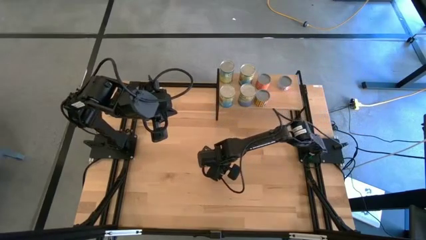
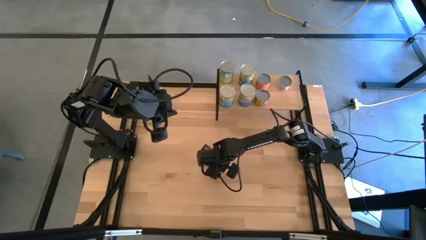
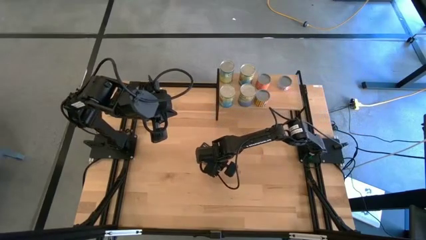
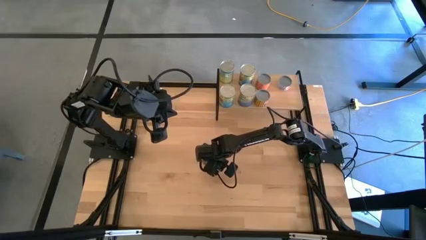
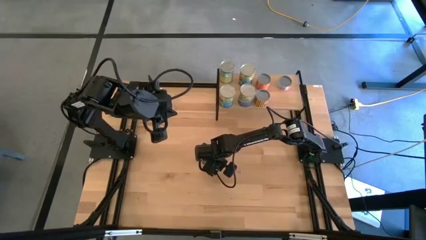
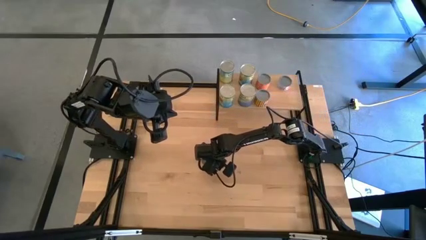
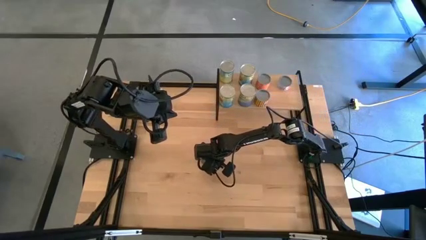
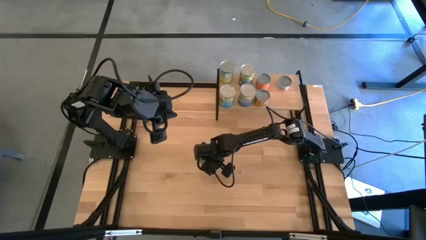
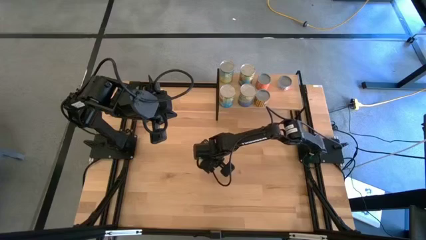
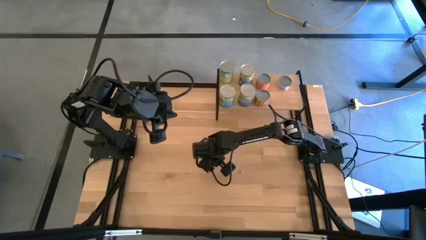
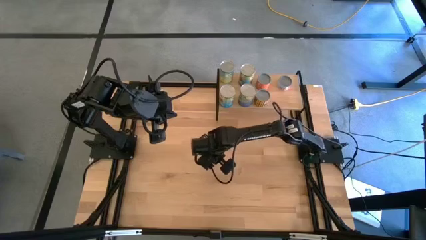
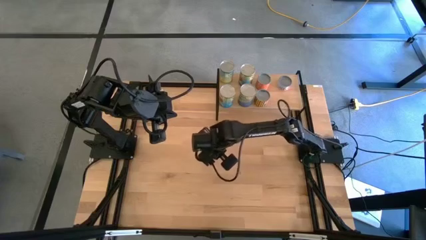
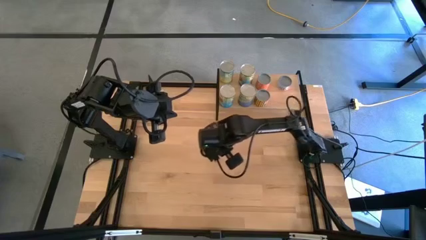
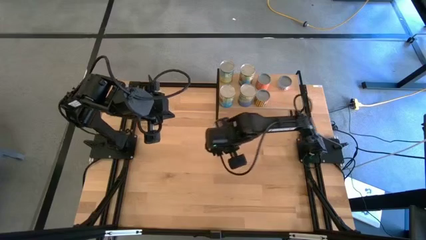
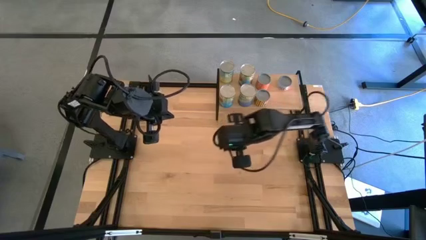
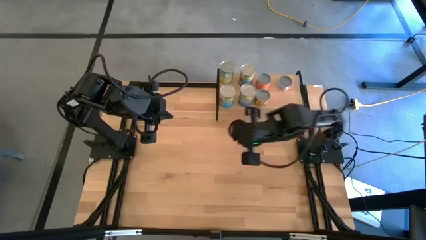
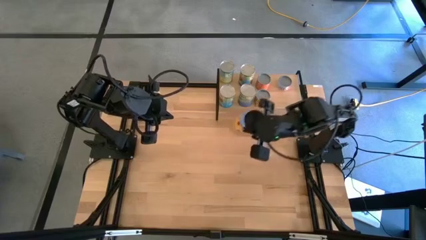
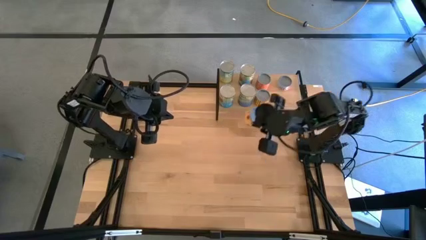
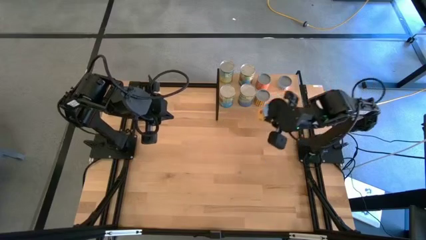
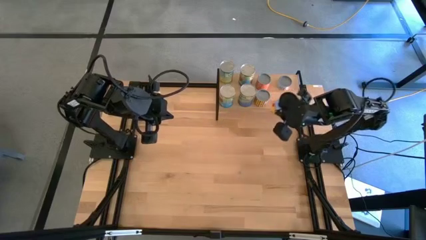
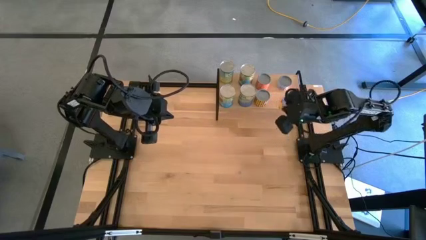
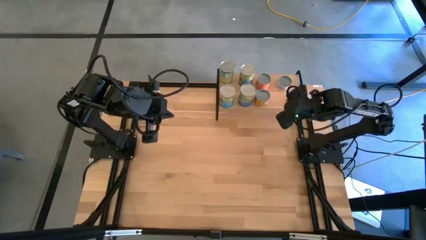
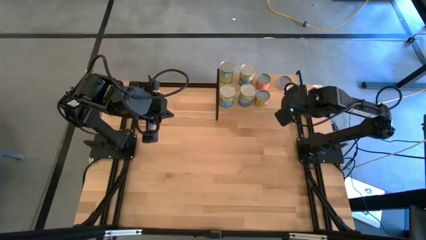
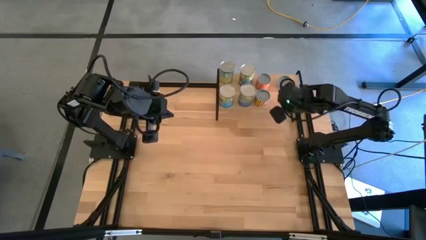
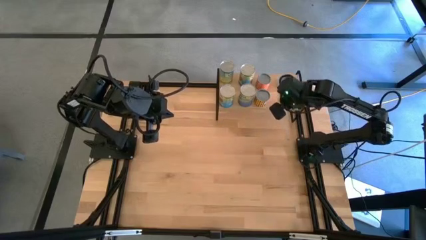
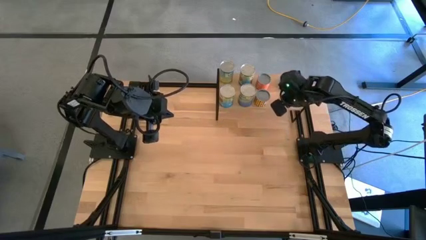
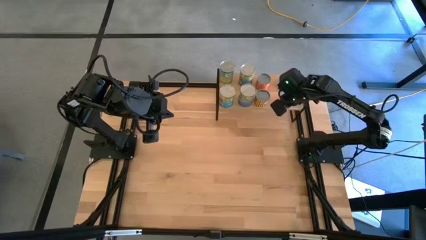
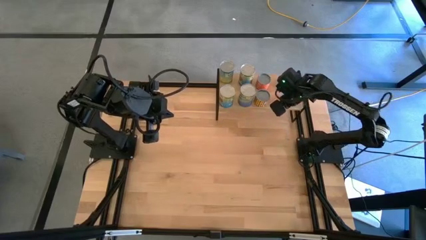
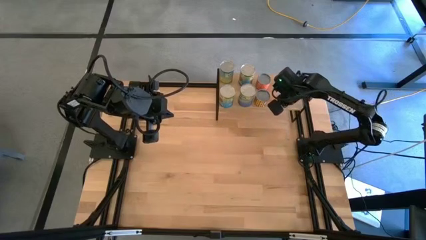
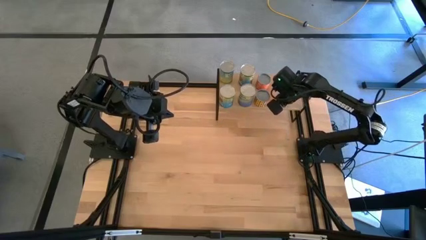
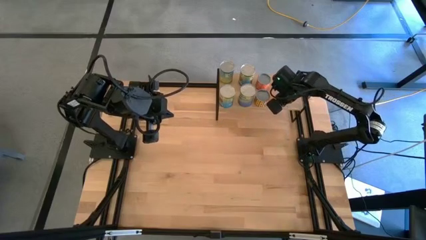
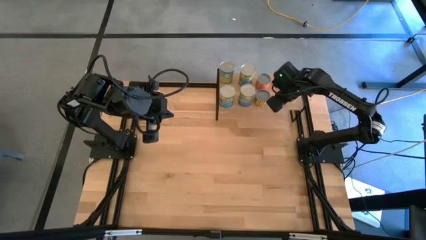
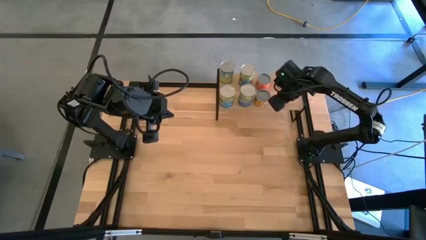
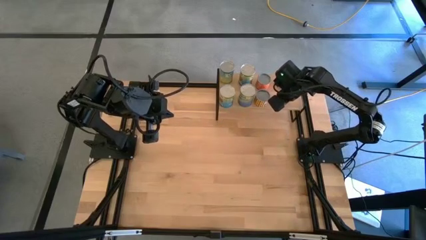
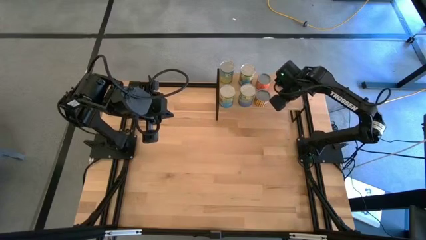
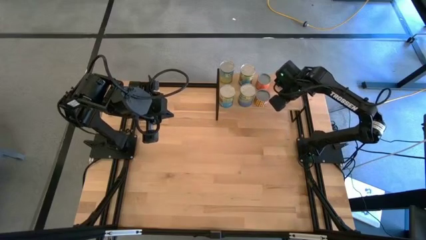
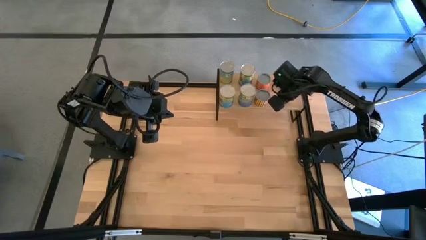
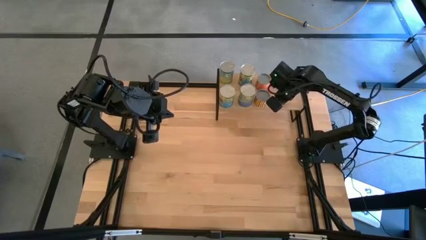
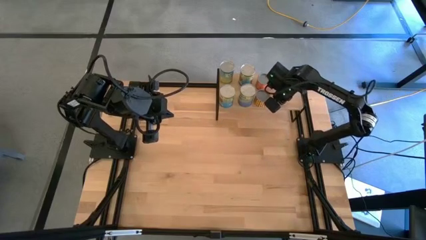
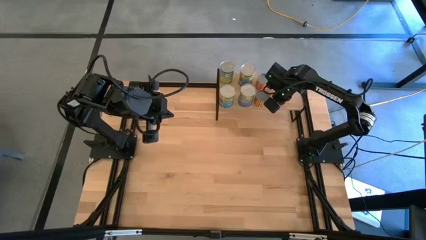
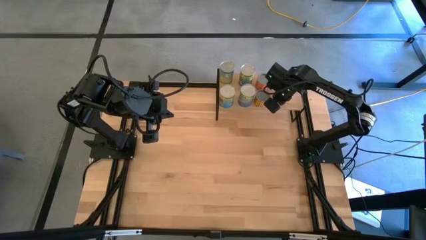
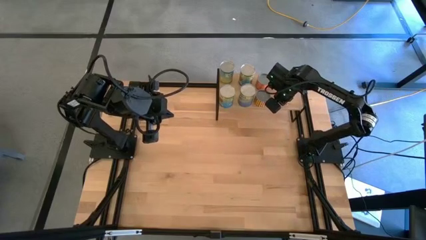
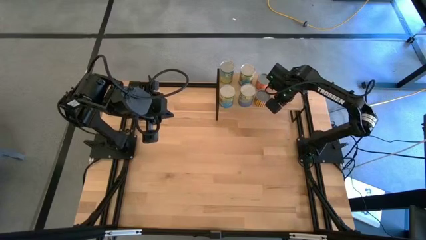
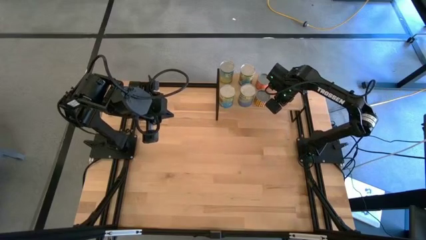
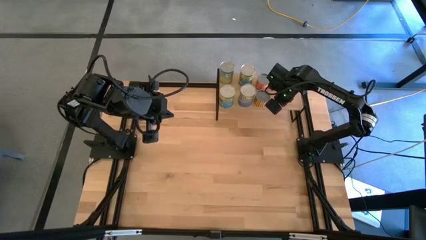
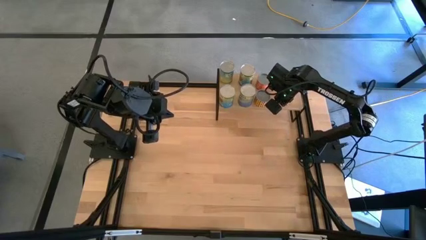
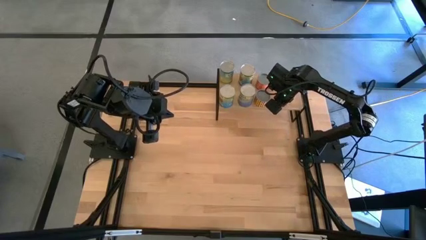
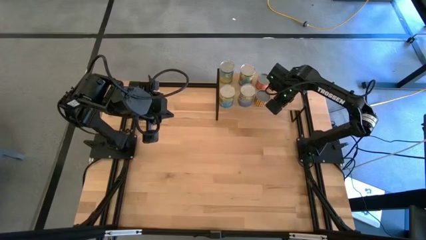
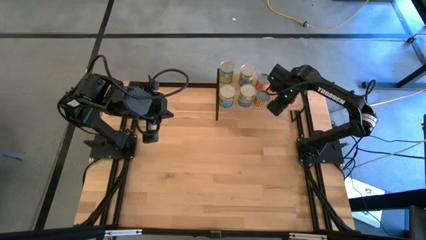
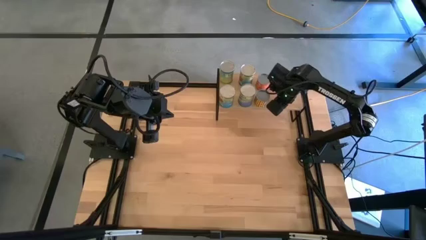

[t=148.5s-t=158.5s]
Task: Pick and place cans onto a shelf
Put the canned pineapple ring on the shelf

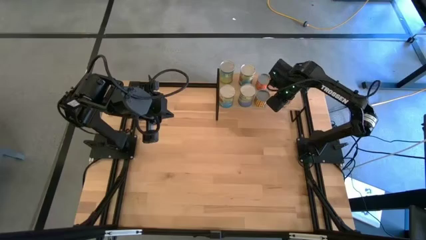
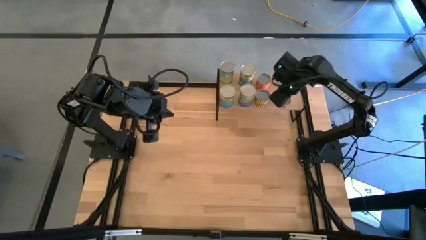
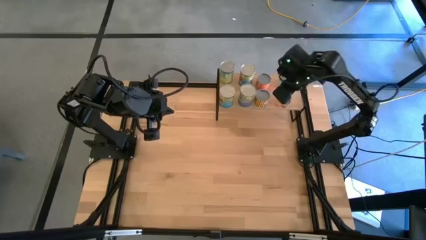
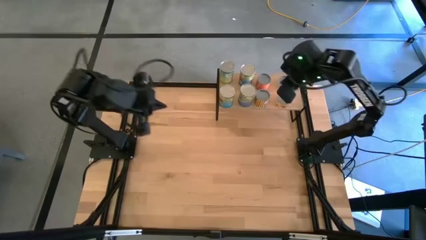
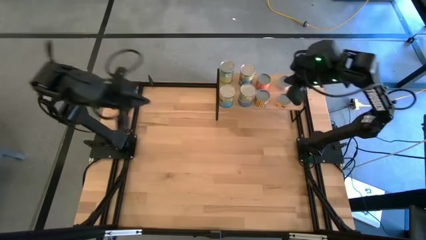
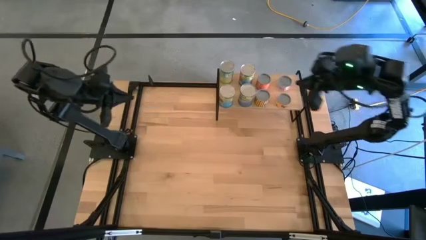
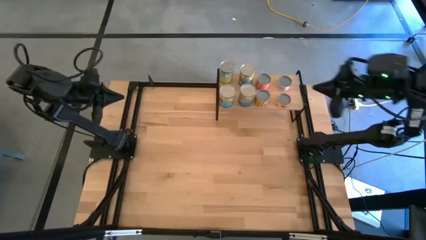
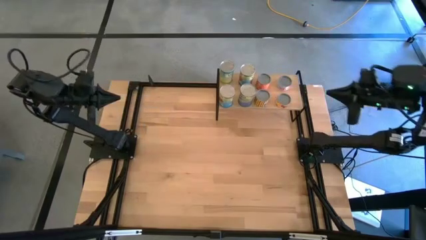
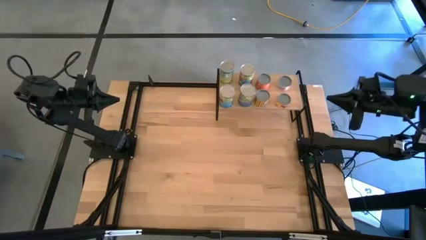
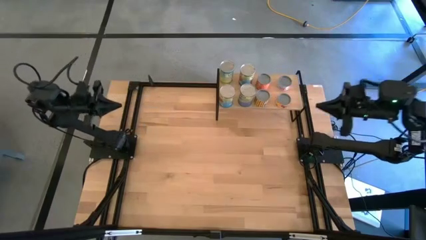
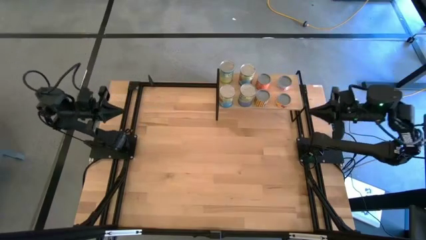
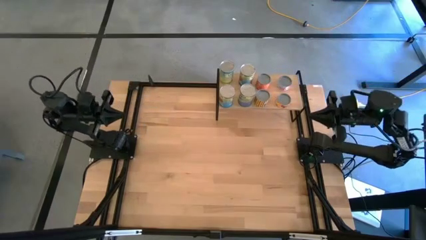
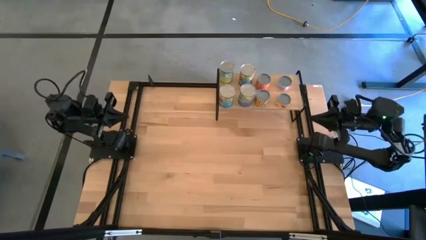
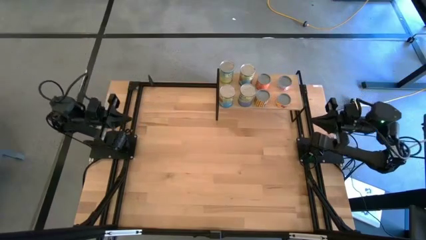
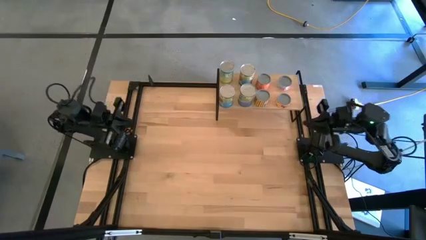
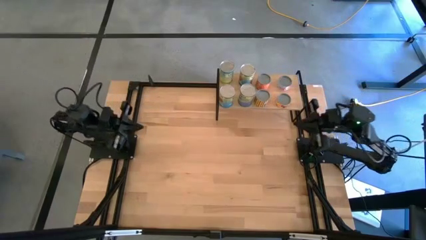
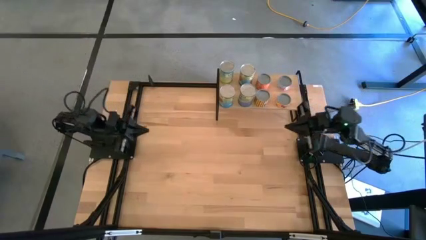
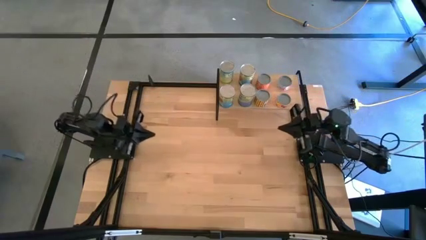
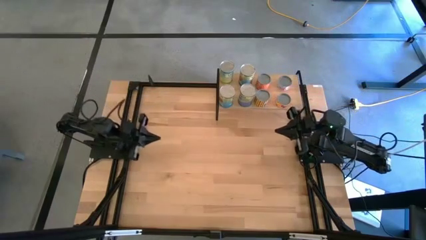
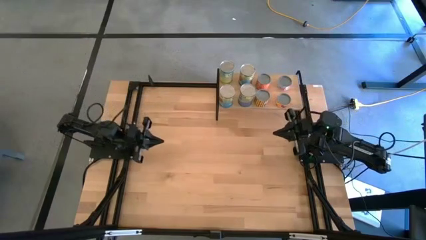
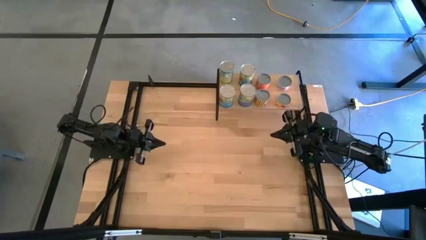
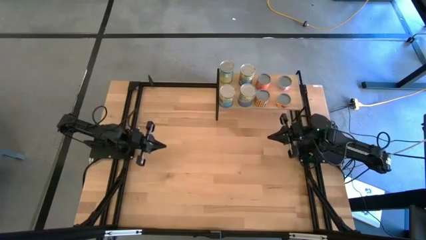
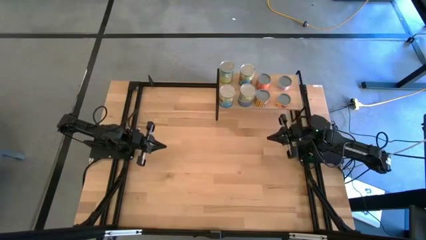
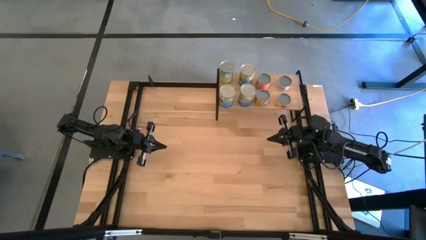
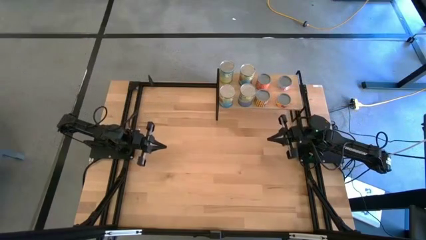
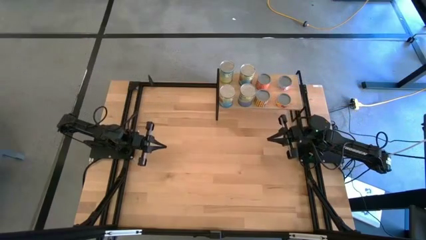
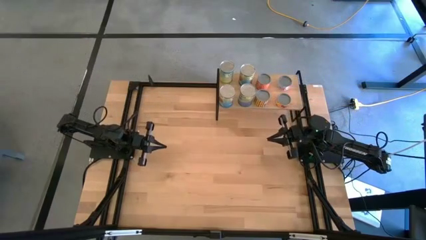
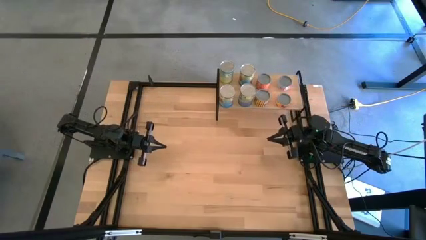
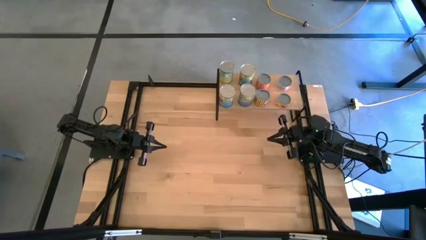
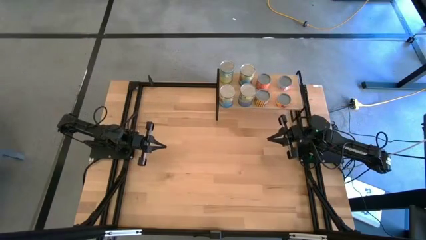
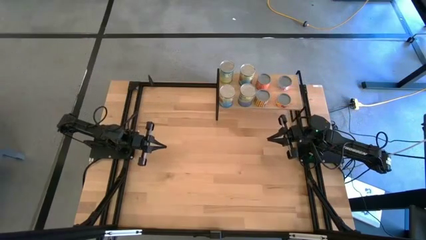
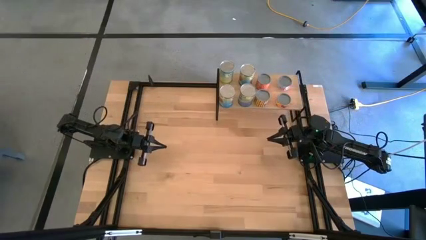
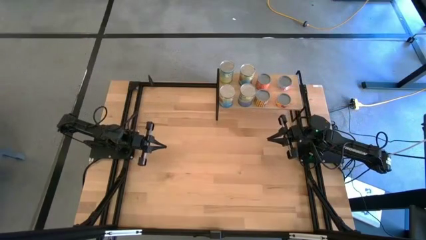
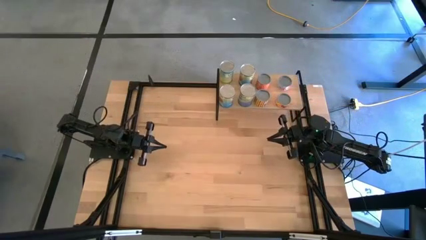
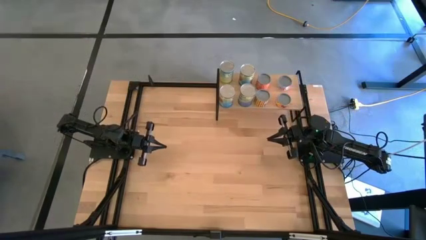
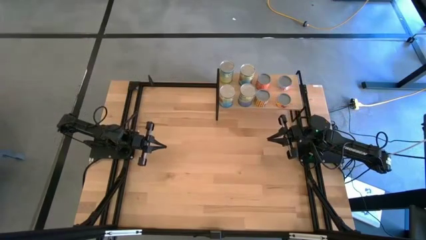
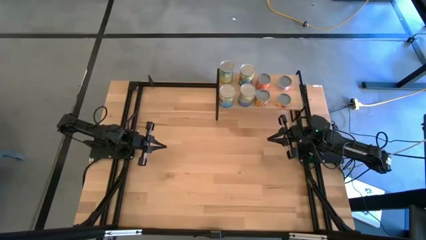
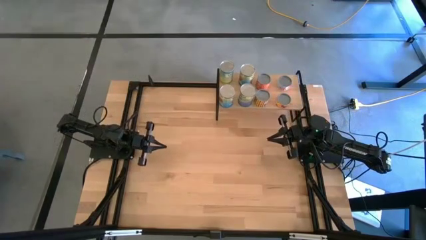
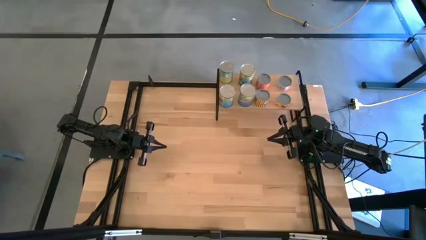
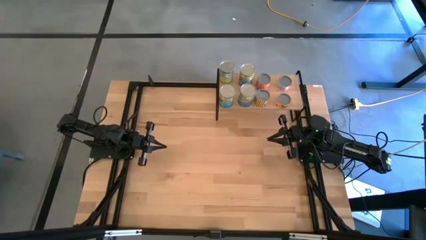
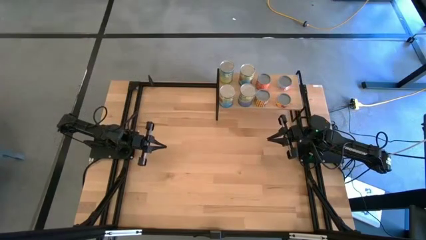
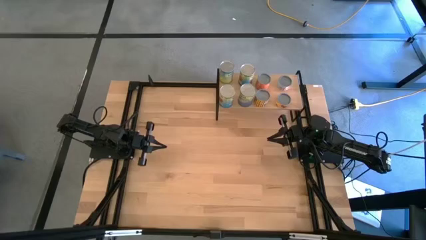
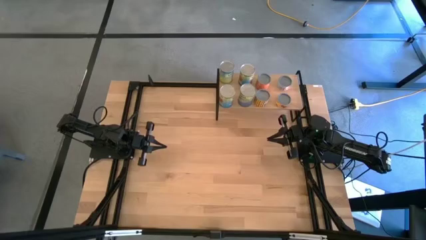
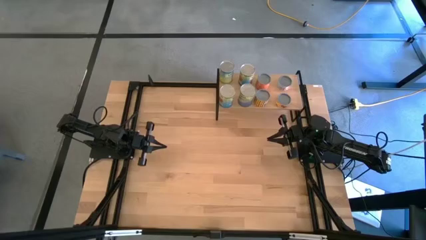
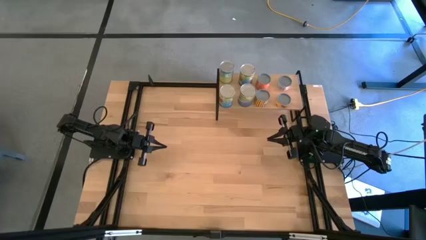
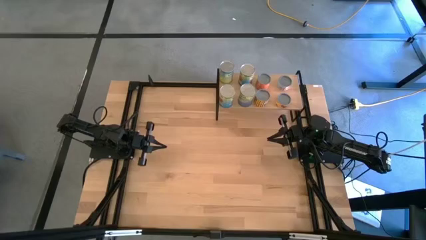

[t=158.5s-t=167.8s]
Return to Home Position
